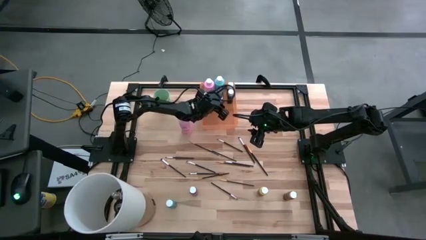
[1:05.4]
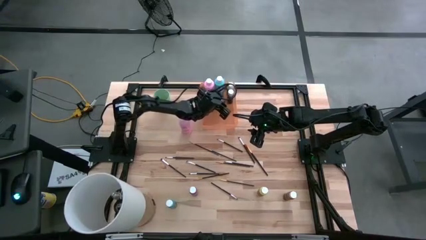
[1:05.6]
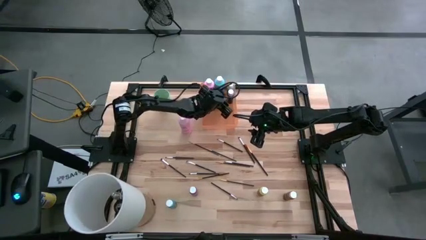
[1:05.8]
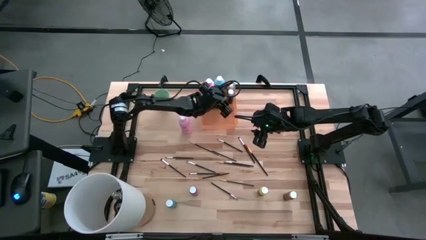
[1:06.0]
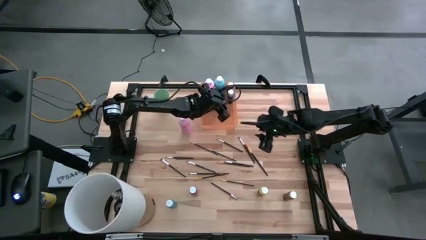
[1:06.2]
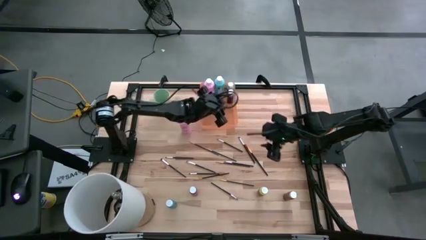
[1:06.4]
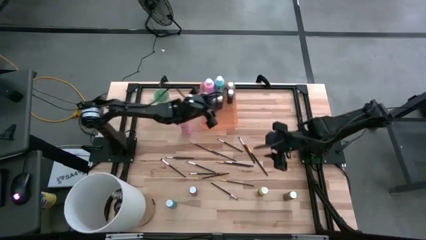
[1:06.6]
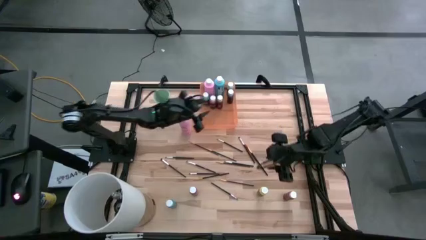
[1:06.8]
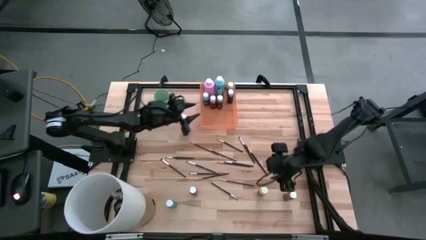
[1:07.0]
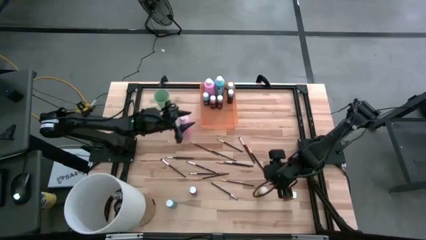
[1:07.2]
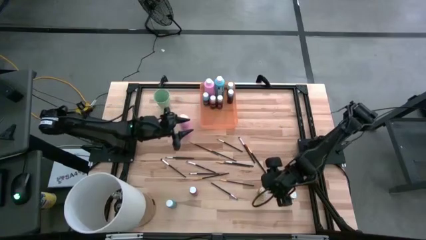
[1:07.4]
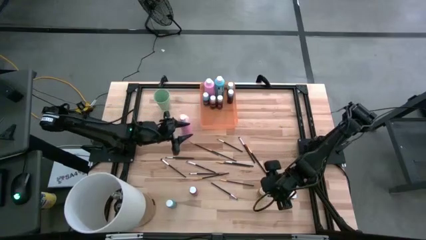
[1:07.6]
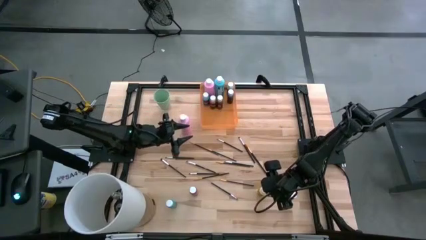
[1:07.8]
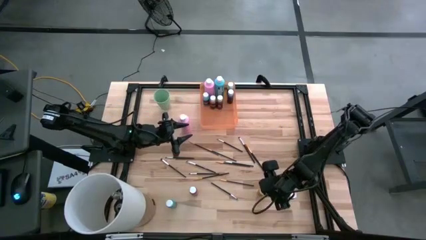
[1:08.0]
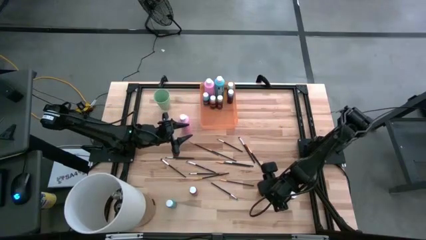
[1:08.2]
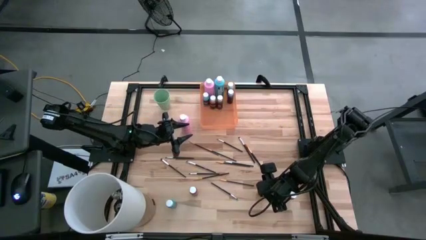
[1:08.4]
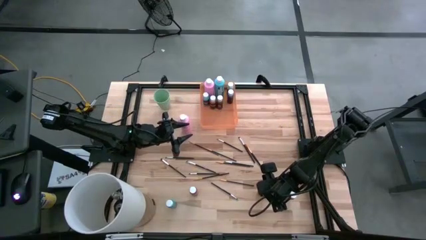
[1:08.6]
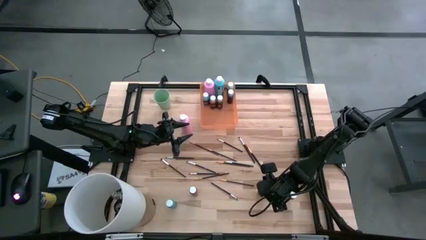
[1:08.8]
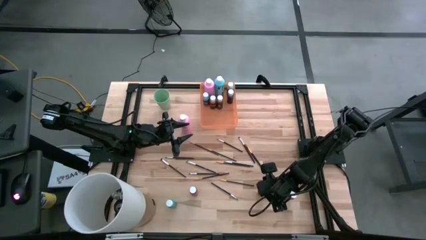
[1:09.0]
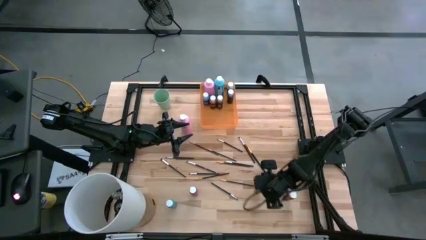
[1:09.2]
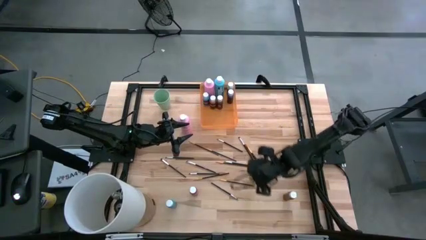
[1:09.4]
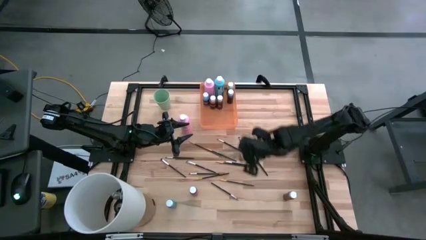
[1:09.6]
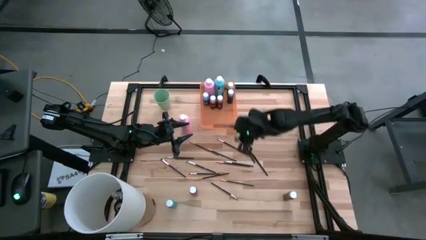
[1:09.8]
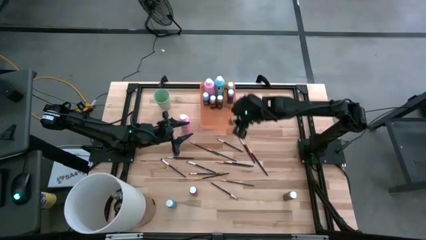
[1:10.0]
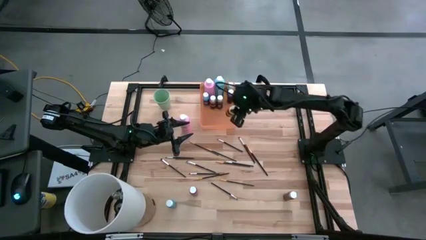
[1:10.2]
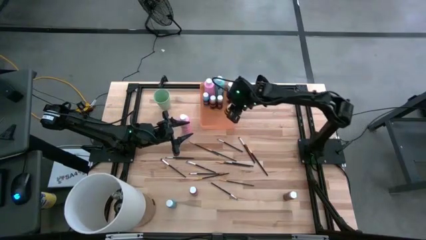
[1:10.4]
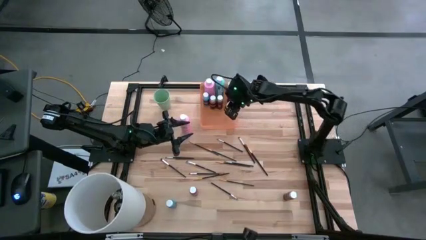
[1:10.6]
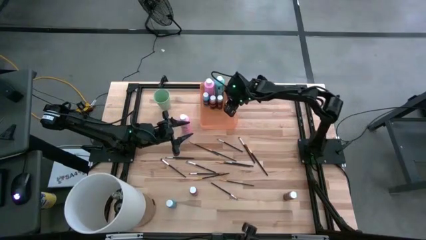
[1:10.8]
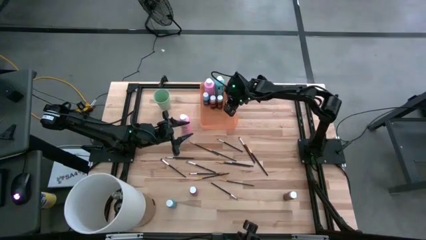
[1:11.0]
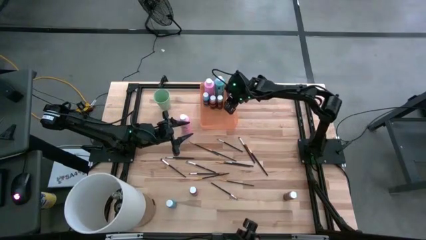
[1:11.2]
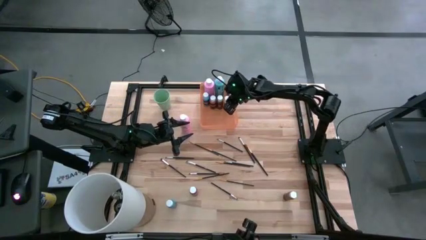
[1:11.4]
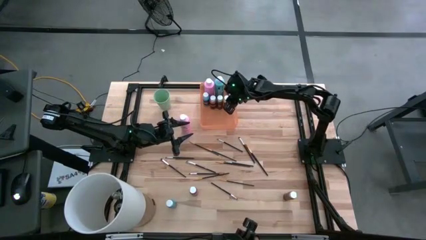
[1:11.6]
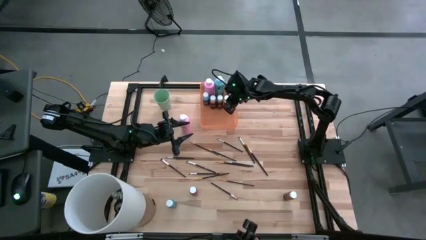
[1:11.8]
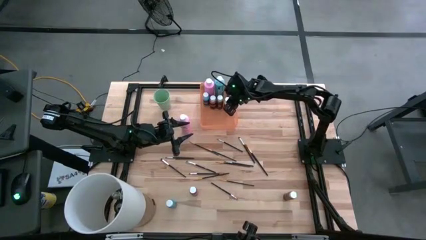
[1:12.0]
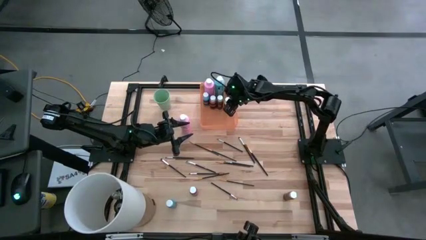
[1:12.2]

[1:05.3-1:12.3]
Task: Pick & Place Paint Supplies
Put the yellow paint bottle into the orange bin

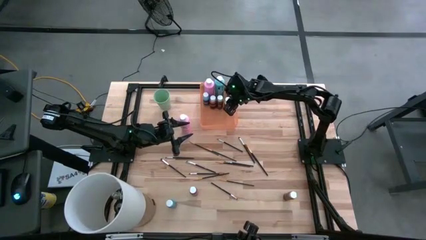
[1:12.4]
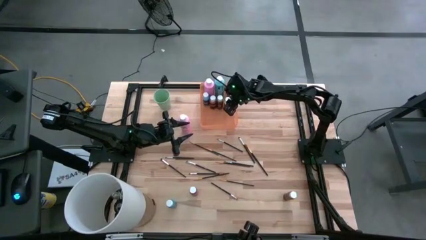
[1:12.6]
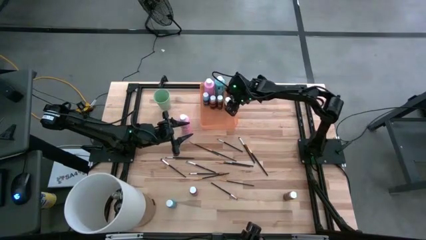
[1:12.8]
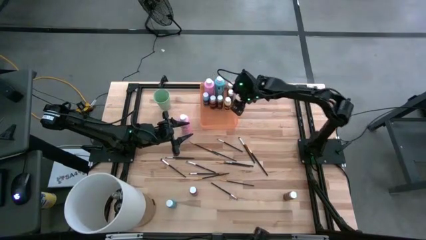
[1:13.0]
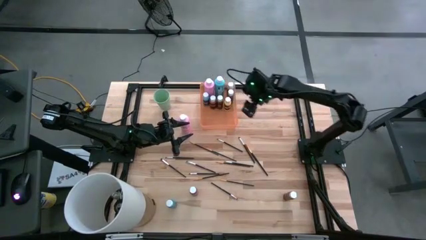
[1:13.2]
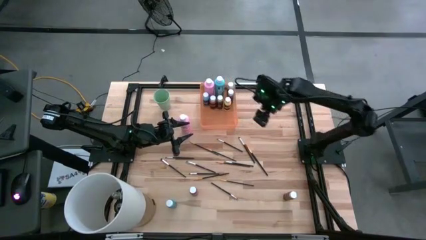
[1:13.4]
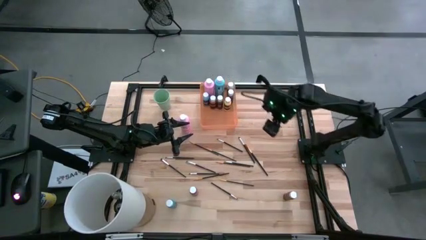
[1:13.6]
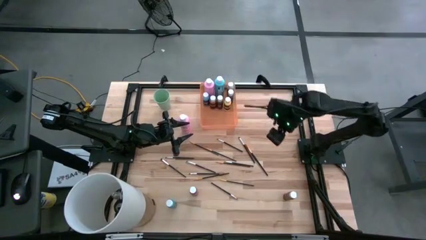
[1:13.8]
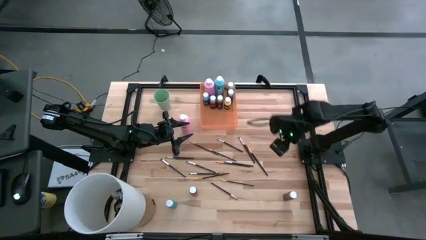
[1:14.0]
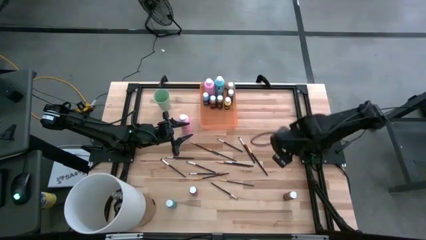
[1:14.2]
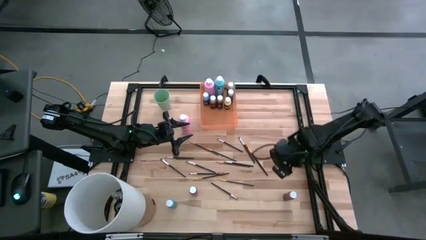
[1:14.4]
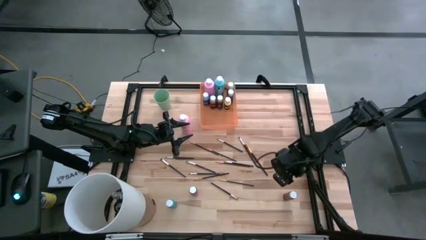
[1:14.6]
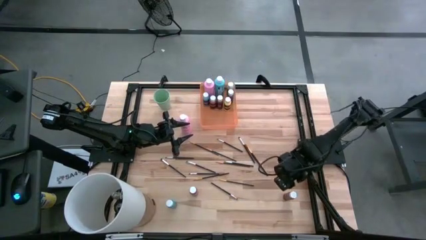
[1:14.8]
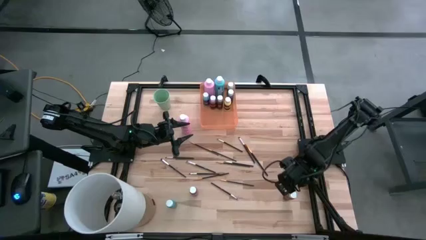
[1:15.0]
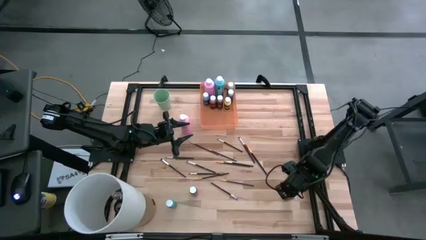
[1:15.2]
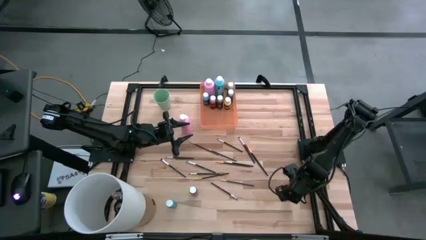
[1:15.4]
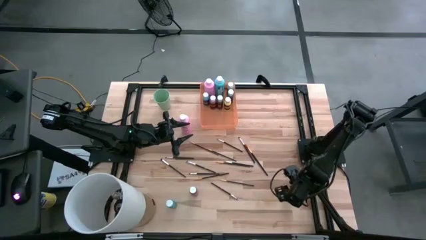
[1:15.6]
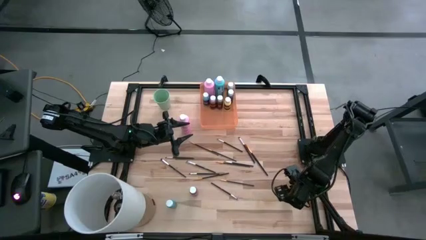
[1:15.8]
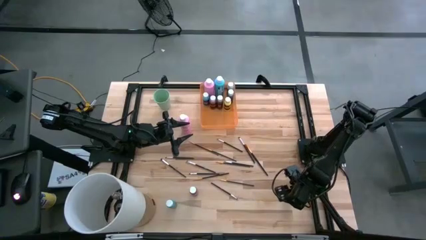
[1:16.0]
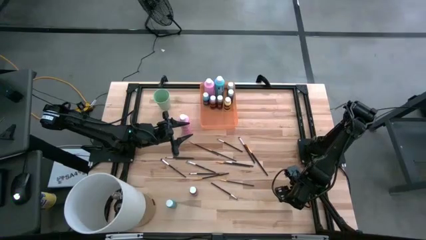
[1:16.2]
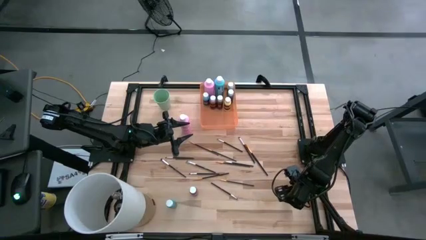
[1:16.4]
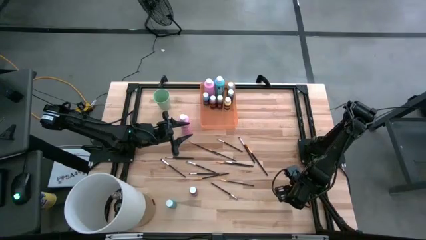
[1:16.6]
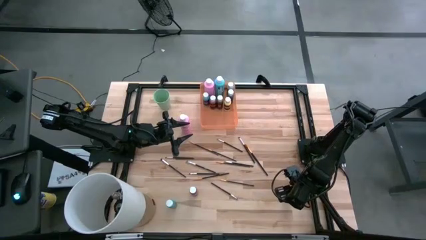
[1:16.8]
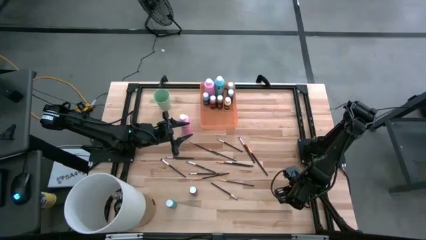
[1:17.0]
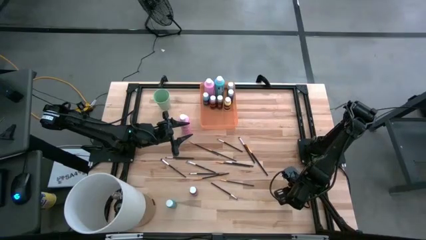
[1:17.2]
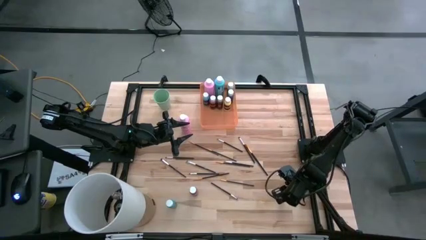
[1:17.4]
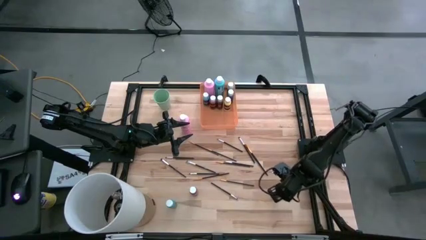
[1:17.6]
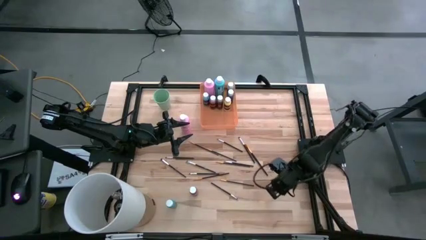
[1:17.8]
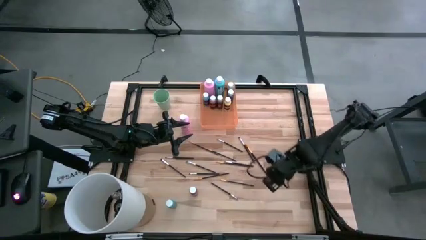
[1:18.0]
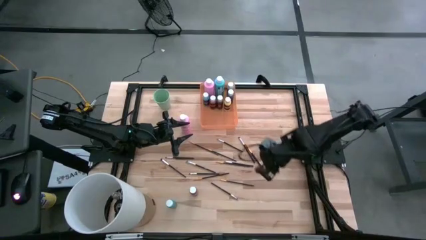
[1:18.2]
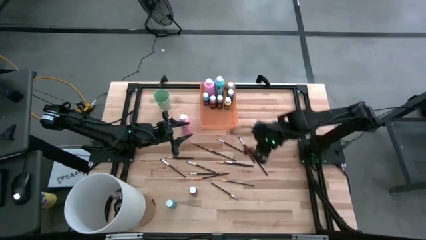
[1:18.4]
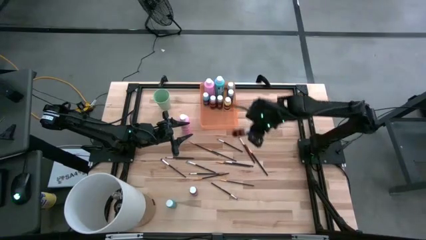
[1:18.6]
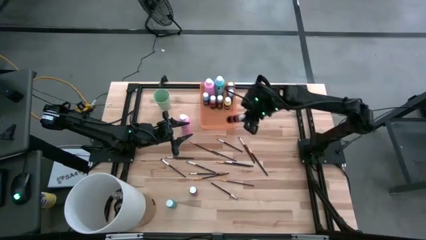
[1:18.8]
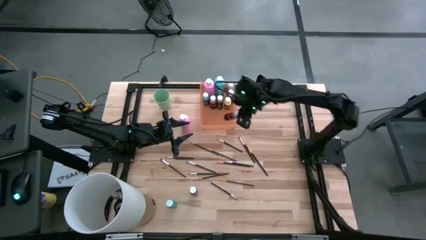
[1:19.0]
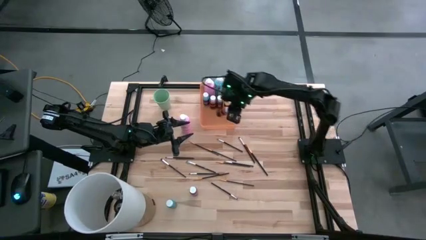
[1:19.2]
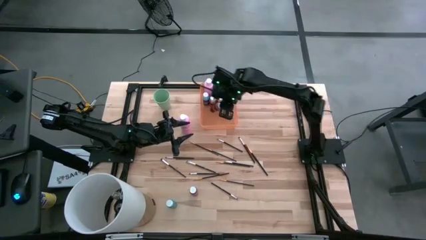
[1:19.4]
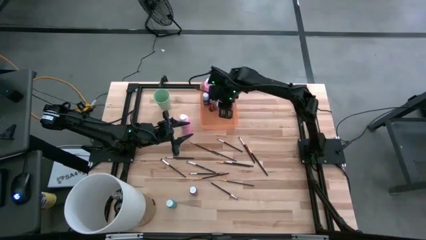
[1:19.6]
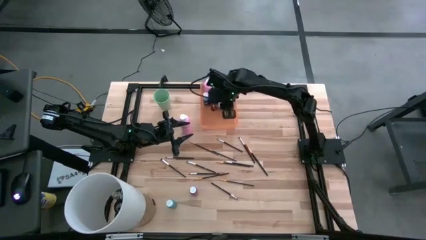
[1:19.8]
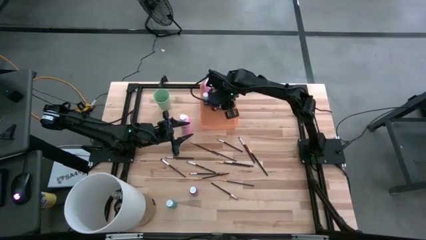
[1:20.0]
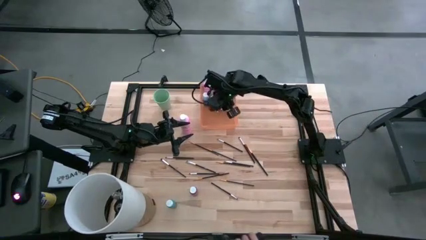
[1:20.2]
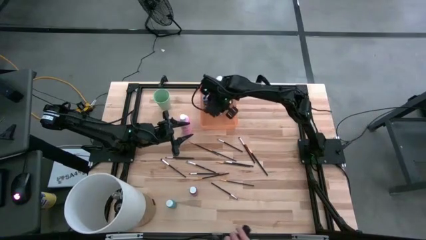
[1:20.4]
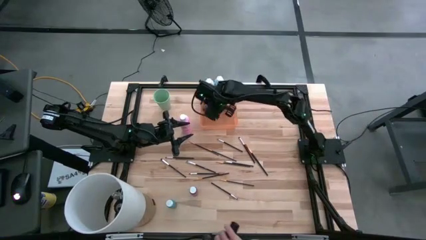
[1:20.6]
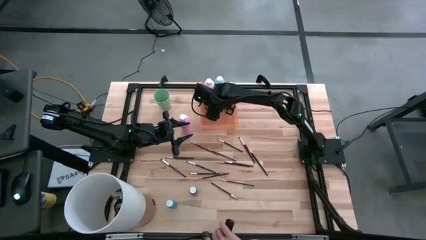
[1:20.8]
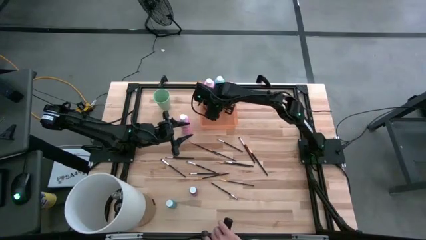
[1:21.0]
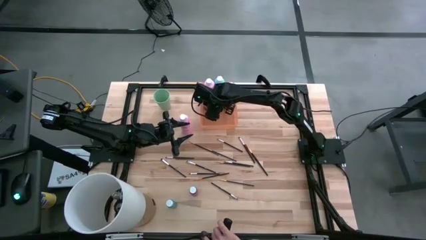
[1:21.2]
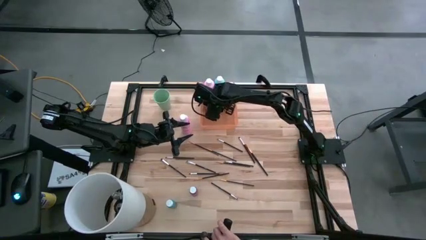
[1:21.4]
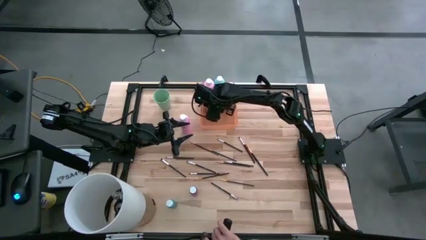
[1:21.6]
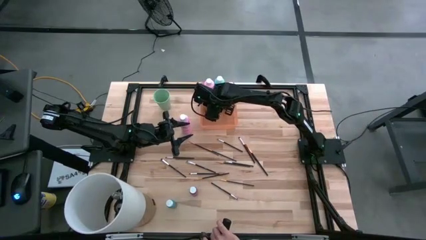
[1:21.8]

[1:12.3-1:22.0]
Put the orange paint bottle into the orange bin
